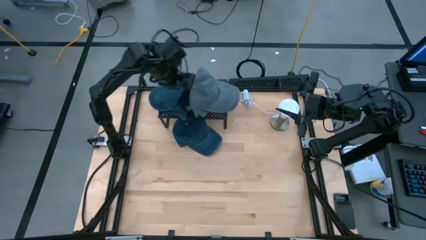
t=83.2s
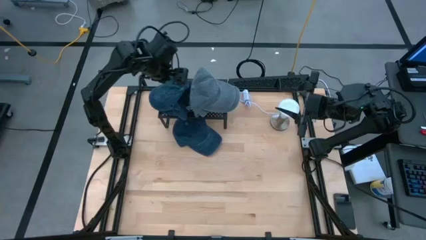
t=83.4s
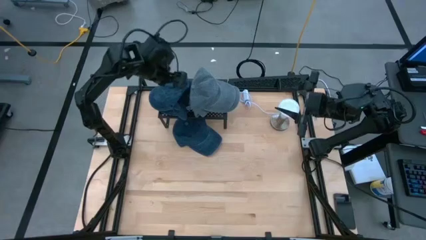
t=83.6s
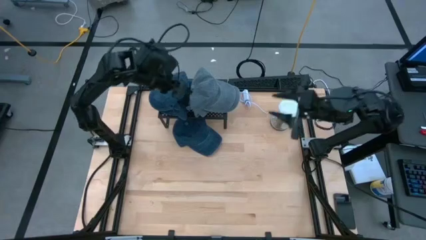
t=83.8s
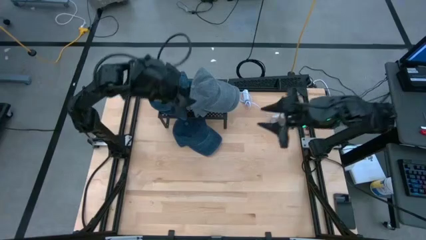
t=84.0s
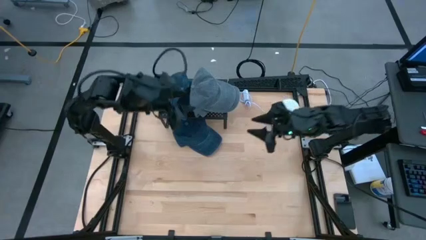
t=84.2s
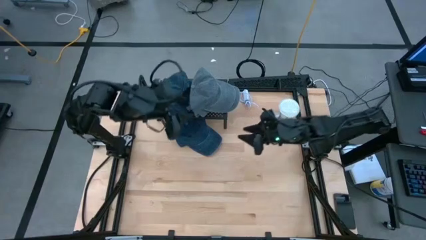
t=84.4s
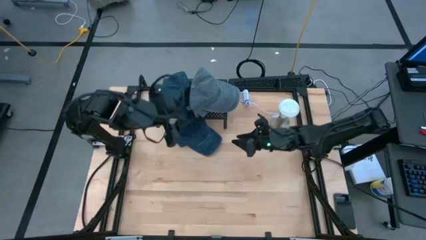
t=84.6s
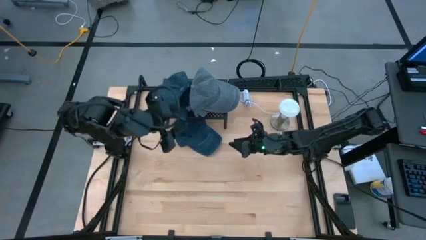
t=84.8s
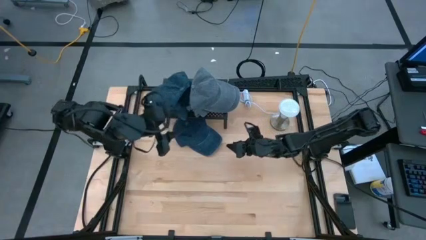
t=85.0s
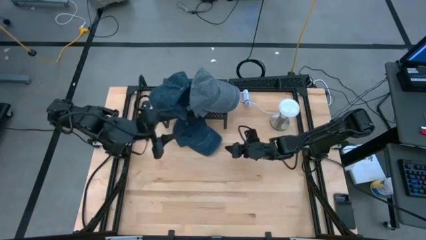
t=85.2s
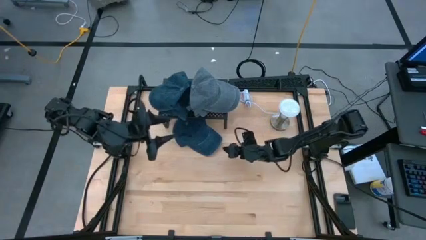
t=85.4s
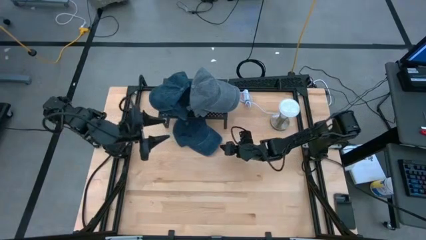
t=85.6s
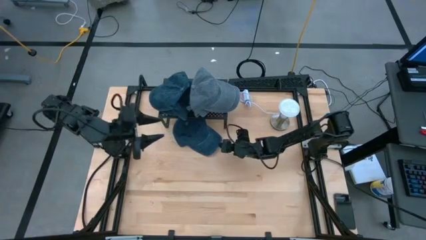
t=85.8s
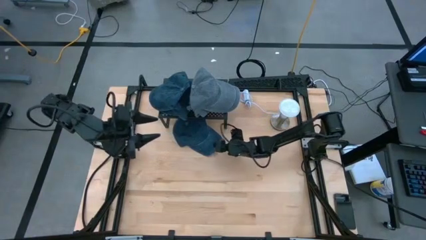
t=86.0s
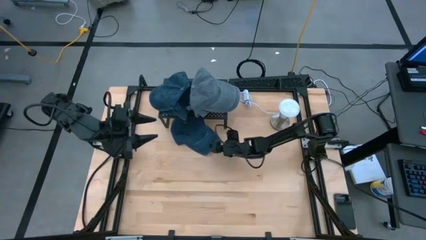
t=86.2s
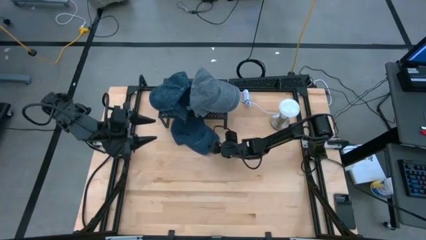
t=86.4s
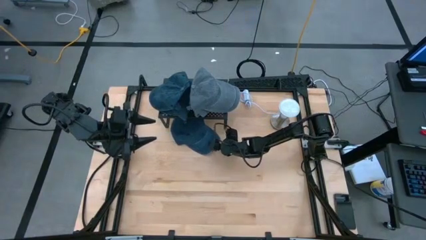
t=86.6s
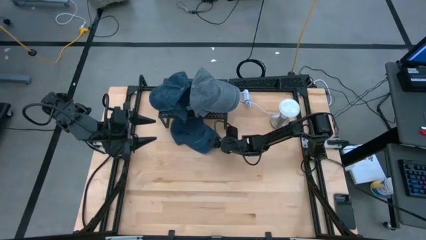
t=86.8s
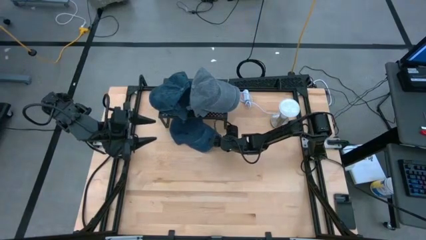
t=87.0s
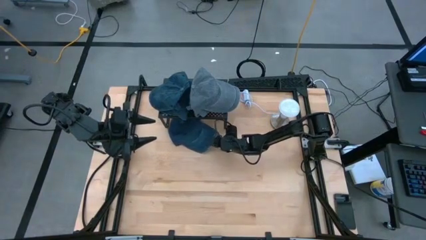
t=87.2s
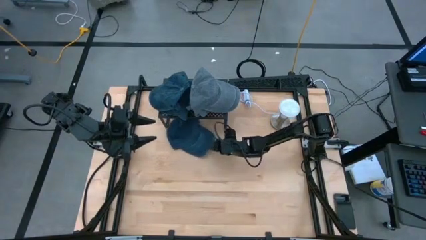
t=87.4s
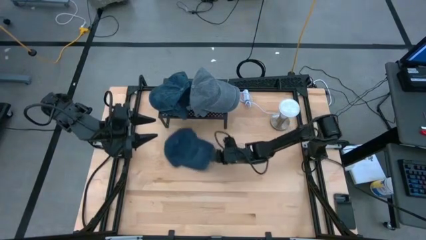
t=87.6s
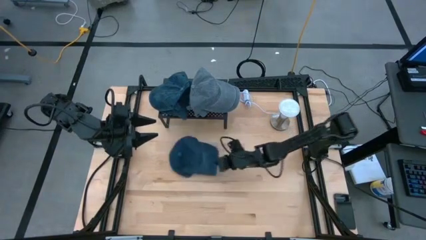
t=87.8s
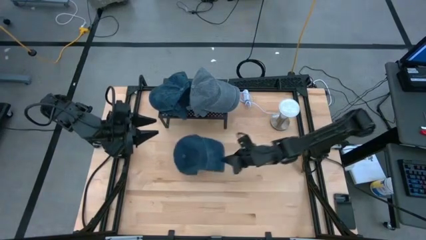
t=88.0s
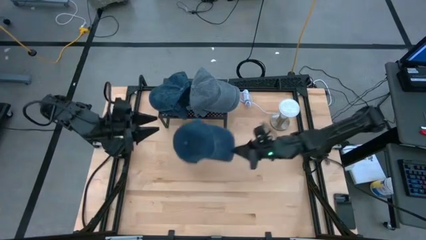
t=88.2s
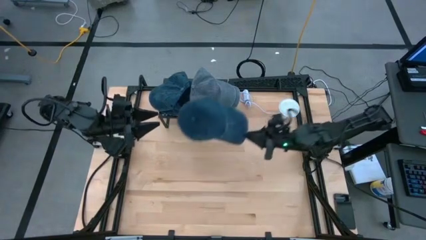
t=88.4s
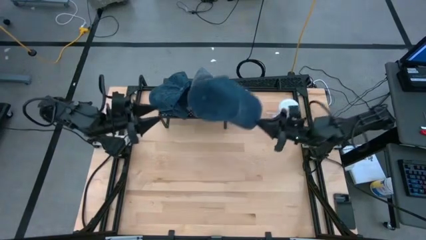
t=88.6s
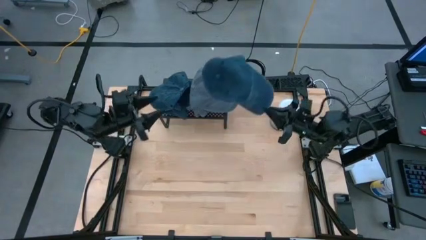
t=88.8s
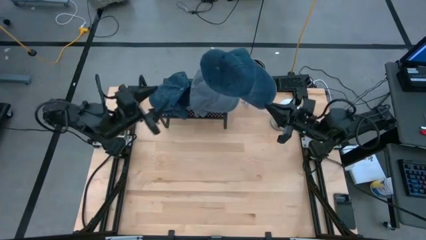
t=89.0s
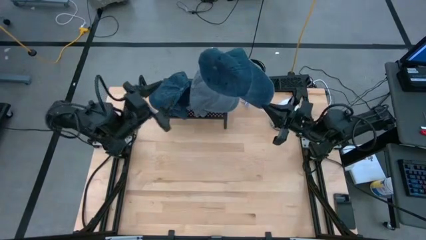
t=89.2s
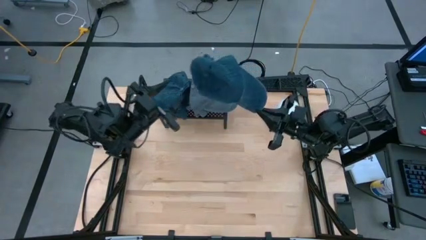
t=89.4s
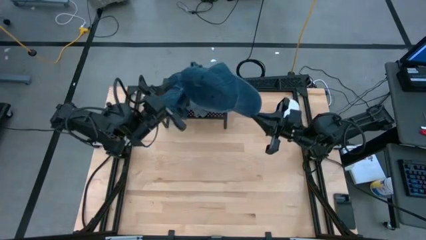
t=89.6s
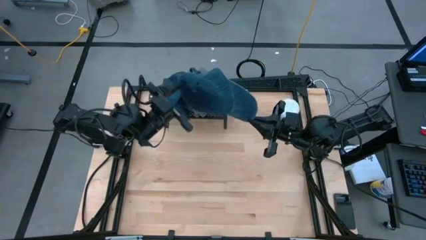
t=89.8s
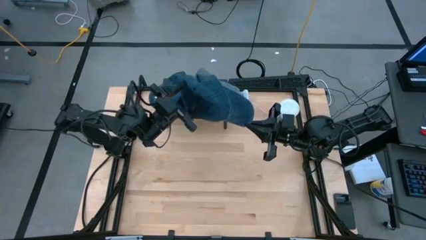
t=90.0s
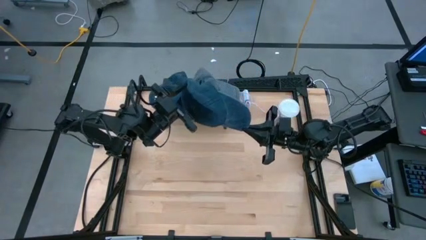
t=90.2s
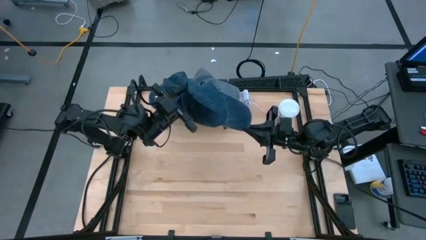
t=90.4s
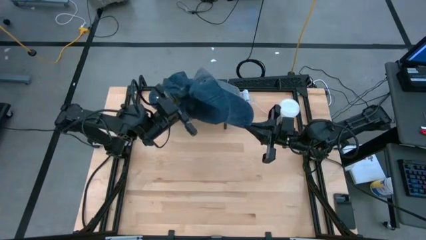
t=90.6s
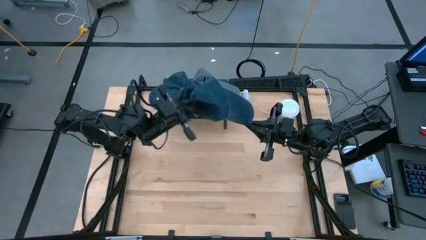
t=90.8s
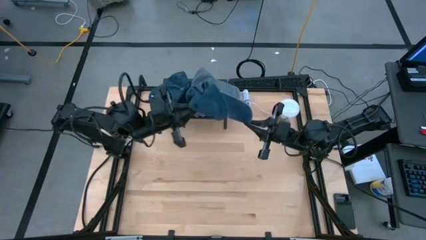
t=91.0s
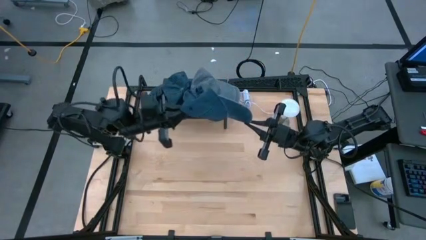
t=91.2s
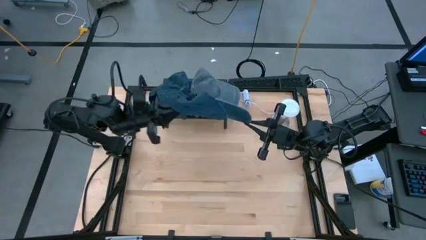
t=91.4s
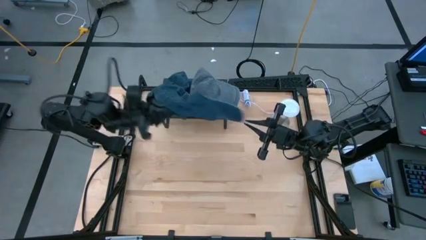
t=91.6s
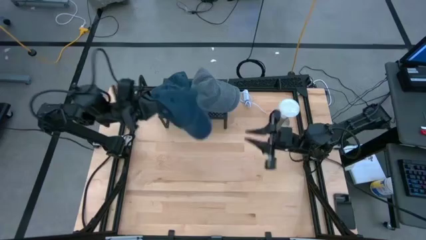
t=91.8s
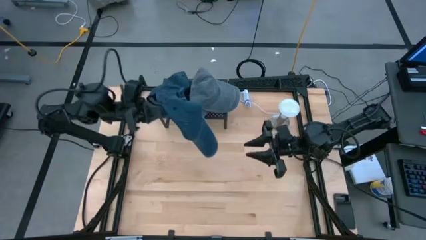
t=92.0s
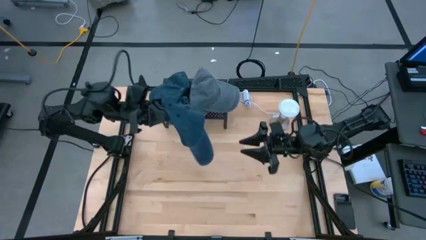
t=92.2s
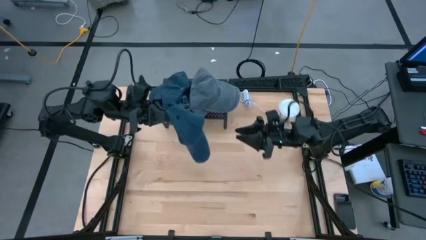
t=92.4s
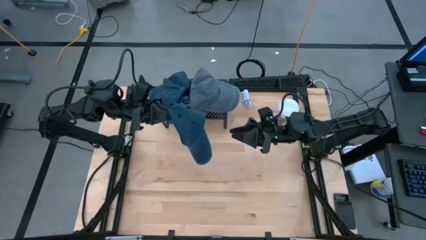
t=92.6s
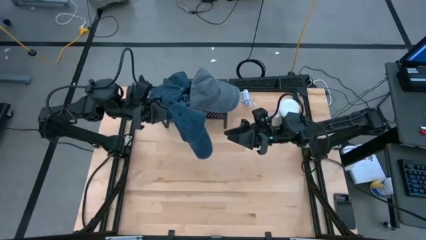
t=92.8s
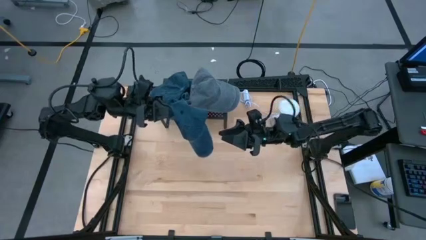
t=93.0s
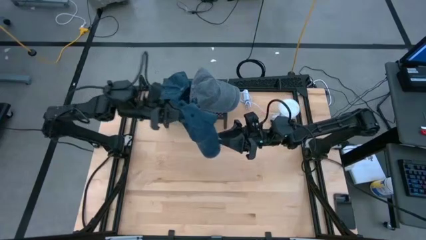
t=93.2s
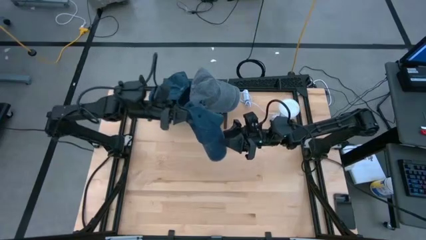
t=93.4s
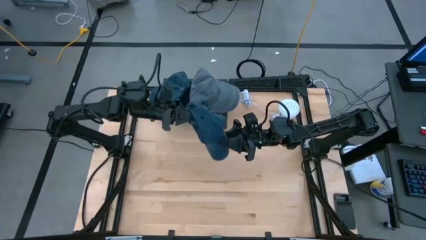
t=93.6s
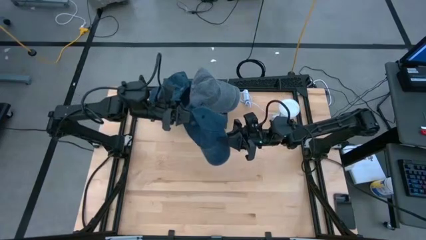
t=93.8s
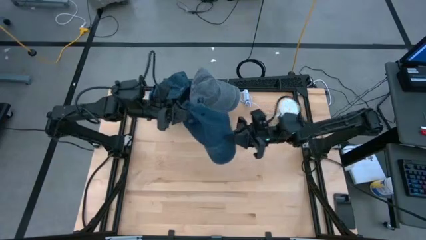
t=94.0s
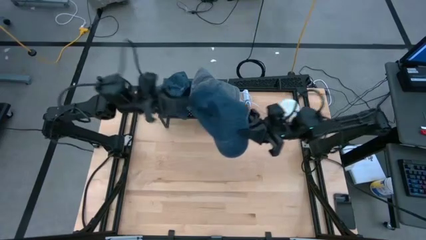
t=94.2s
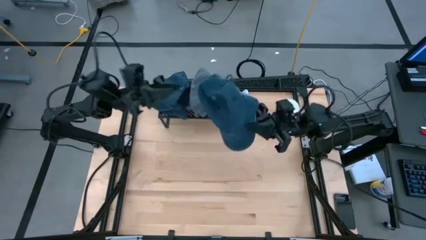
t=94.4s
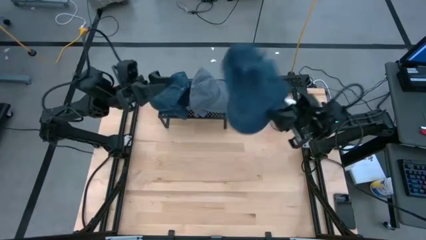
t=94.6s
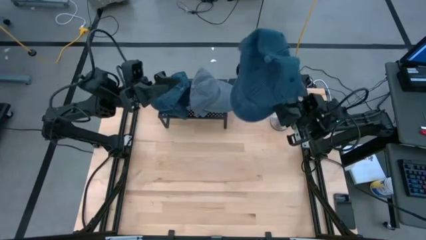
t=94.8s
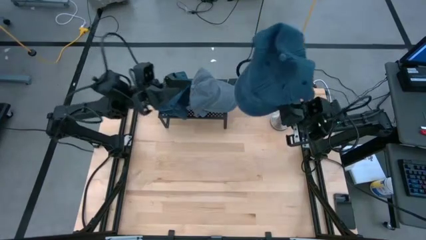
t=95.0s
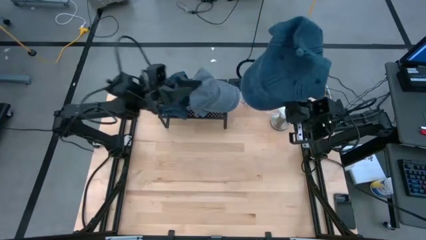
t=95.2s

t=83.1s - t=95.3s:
Task: Pick & Place hat
Stack the dark blue cap on top of the other dark blue cap on the shelf
